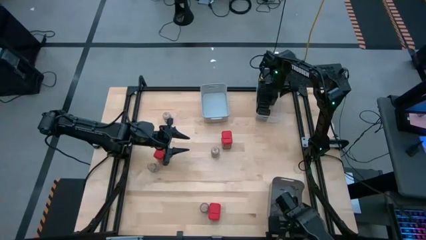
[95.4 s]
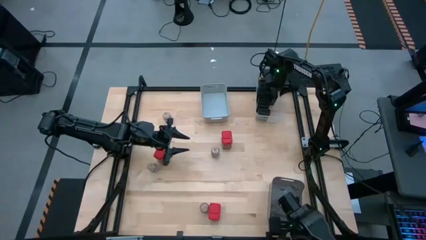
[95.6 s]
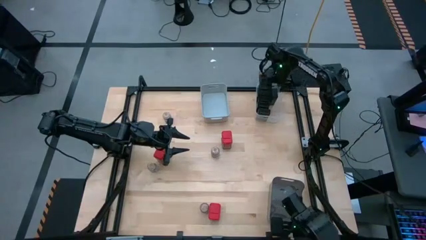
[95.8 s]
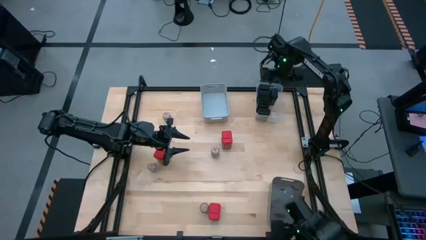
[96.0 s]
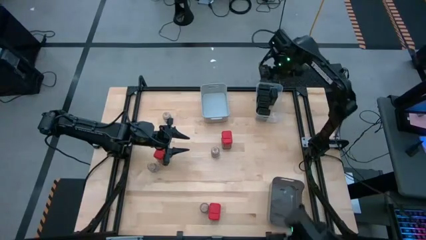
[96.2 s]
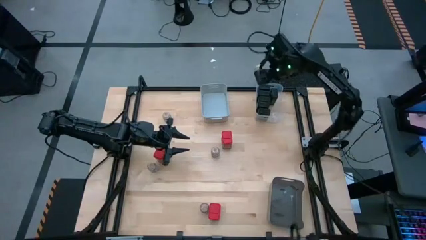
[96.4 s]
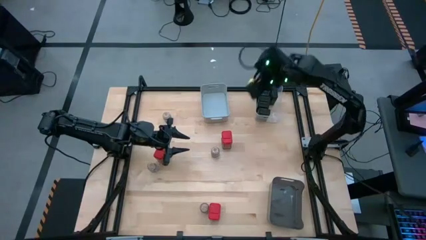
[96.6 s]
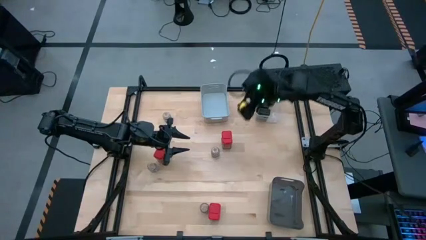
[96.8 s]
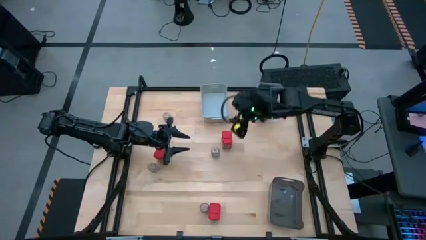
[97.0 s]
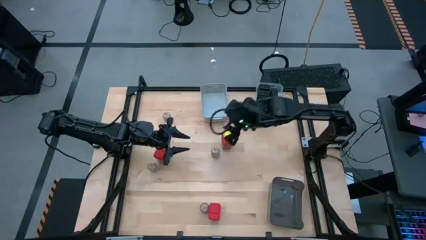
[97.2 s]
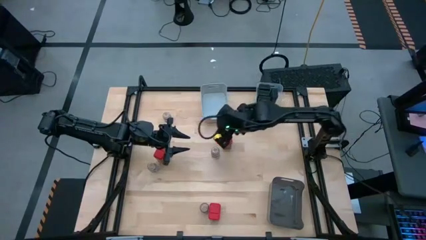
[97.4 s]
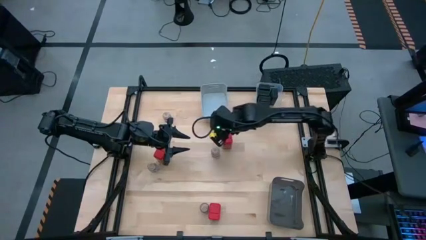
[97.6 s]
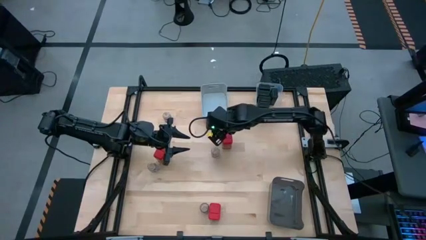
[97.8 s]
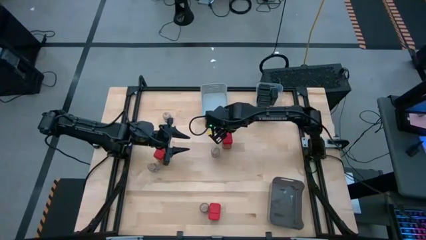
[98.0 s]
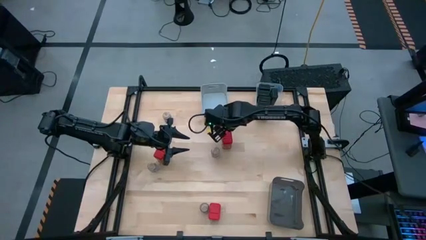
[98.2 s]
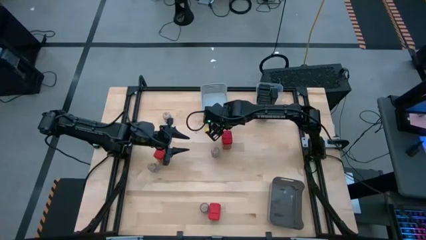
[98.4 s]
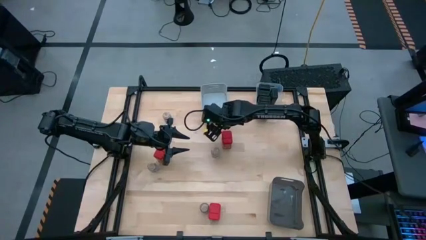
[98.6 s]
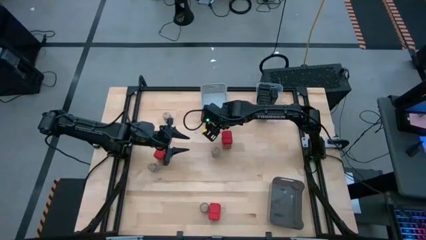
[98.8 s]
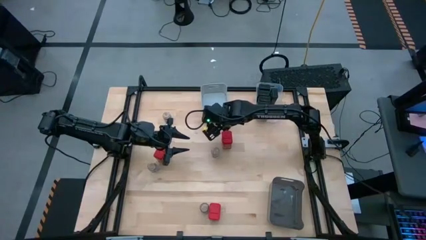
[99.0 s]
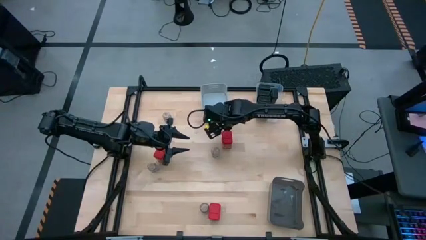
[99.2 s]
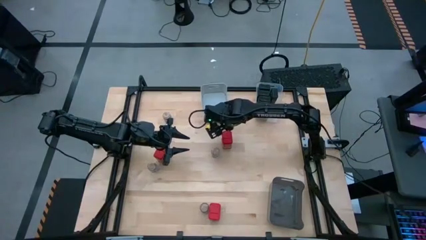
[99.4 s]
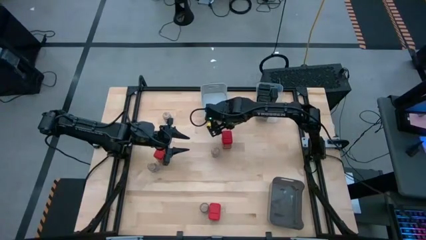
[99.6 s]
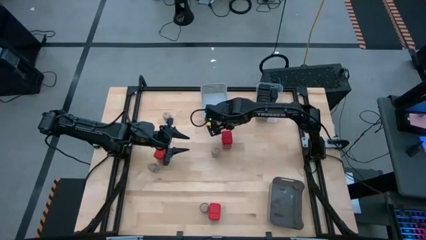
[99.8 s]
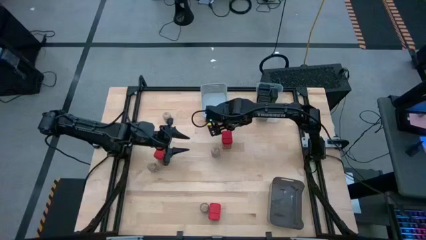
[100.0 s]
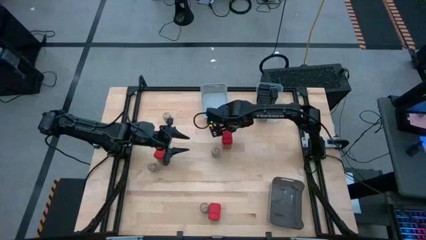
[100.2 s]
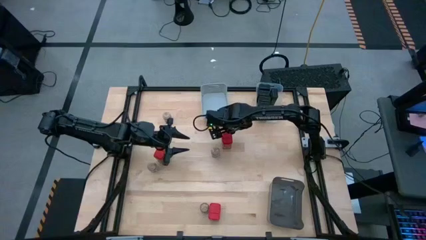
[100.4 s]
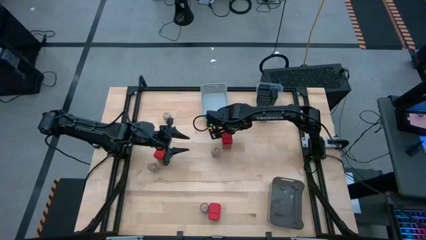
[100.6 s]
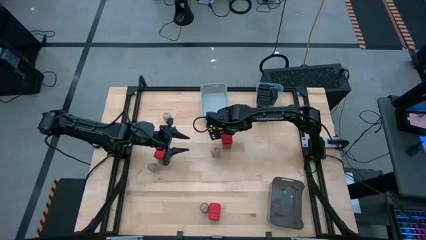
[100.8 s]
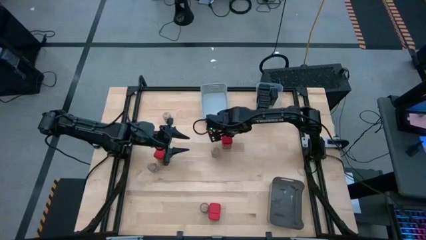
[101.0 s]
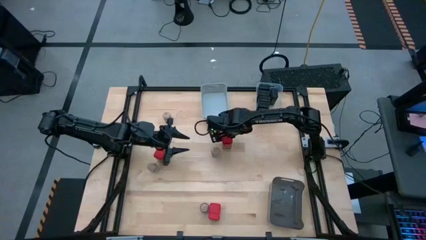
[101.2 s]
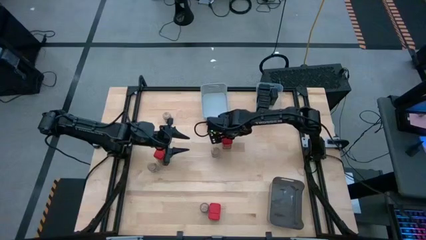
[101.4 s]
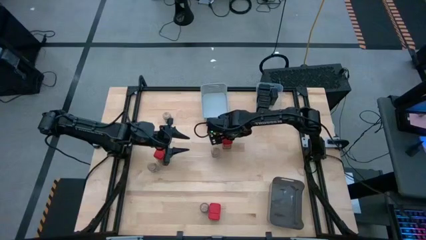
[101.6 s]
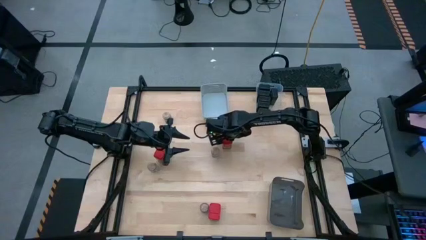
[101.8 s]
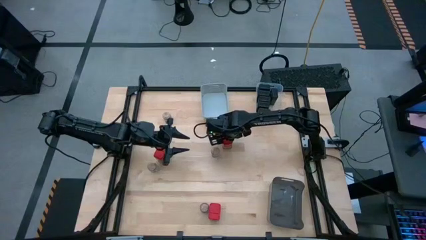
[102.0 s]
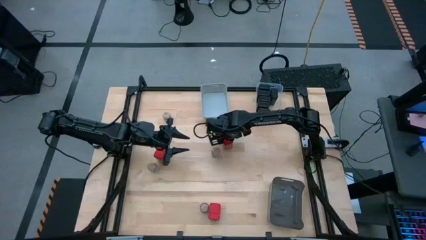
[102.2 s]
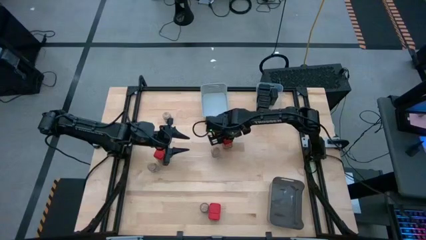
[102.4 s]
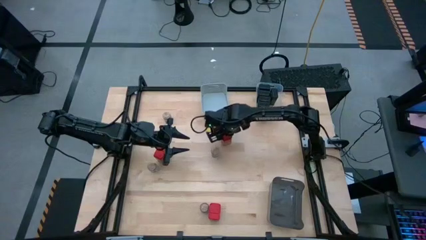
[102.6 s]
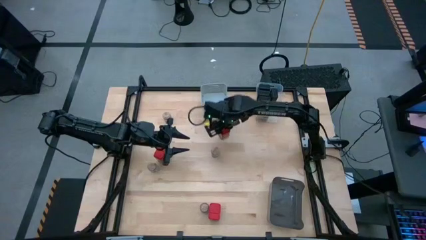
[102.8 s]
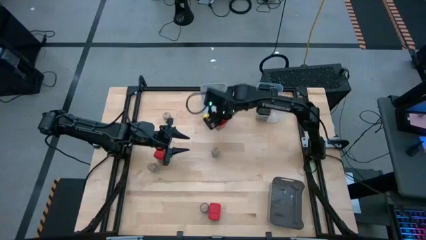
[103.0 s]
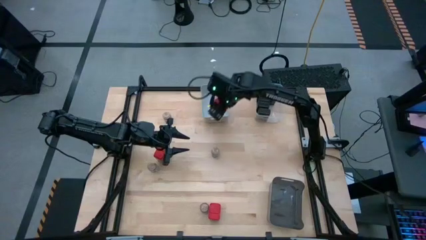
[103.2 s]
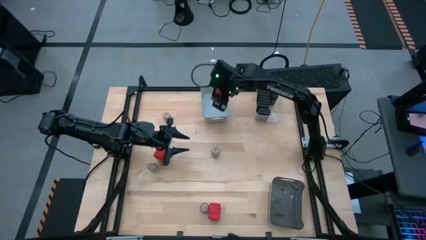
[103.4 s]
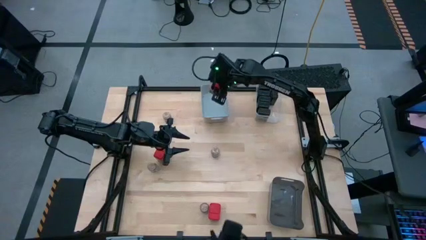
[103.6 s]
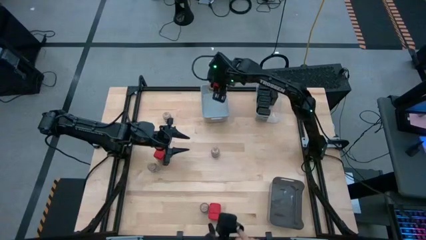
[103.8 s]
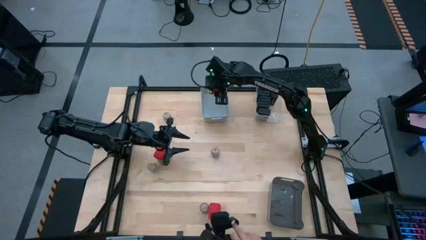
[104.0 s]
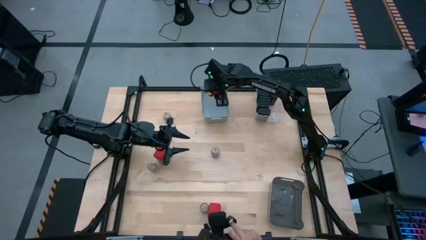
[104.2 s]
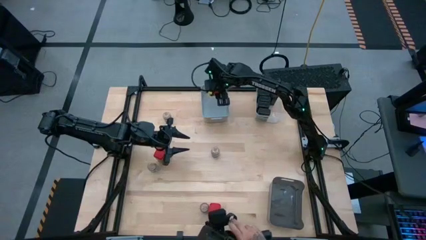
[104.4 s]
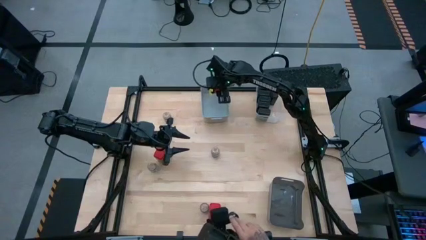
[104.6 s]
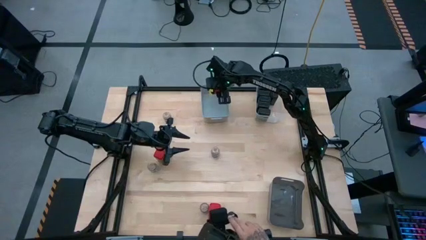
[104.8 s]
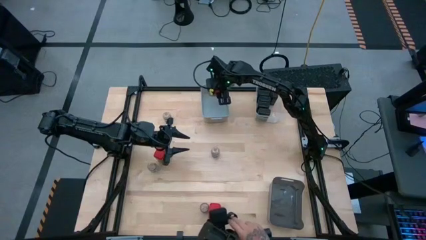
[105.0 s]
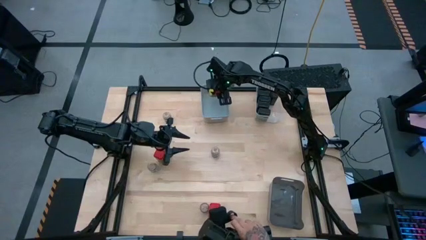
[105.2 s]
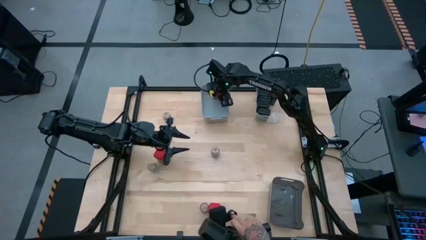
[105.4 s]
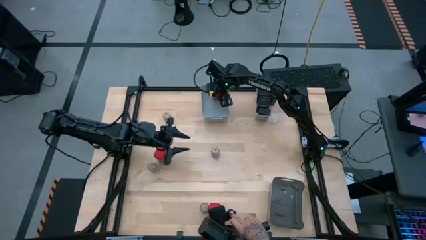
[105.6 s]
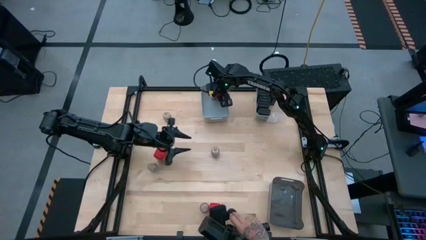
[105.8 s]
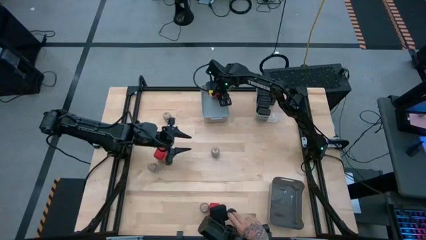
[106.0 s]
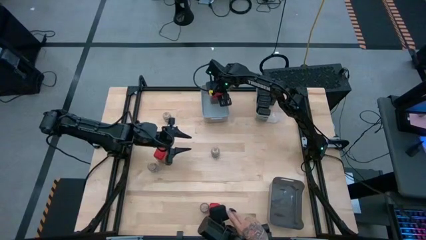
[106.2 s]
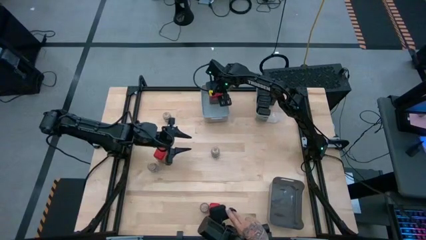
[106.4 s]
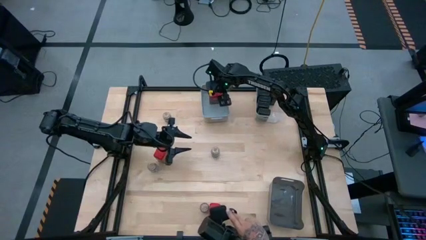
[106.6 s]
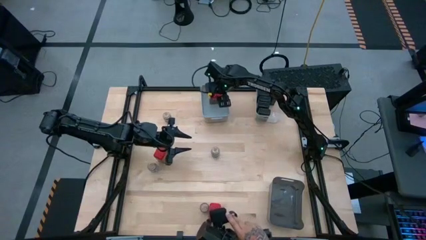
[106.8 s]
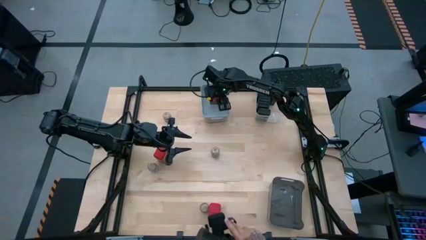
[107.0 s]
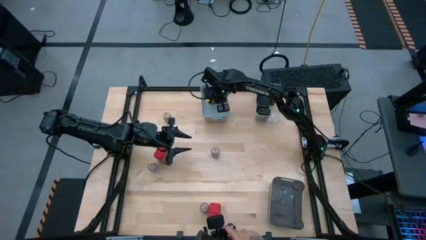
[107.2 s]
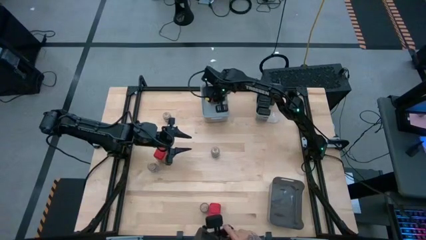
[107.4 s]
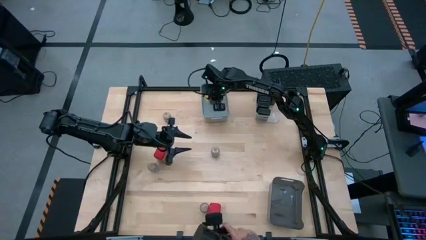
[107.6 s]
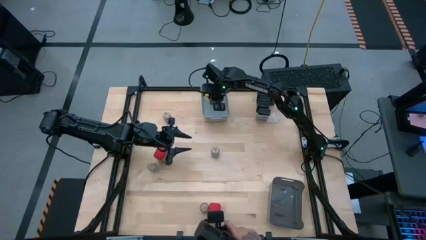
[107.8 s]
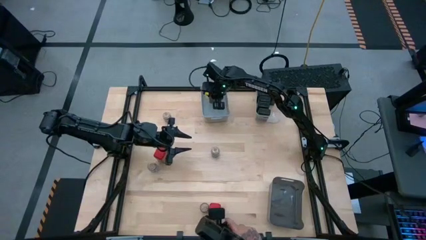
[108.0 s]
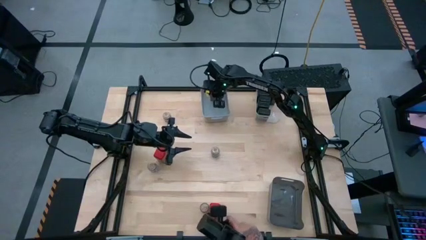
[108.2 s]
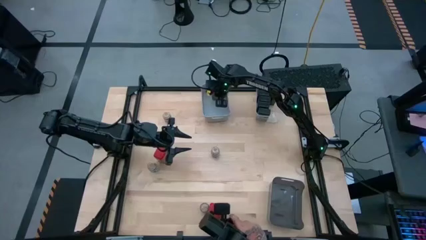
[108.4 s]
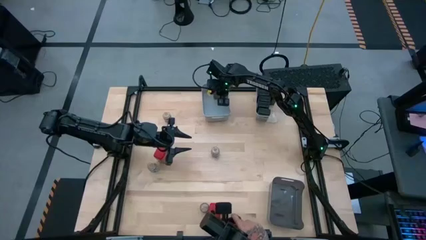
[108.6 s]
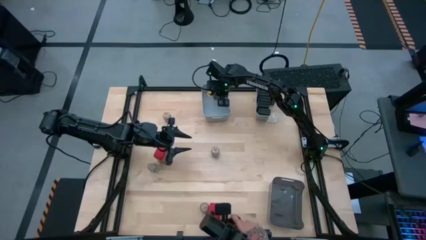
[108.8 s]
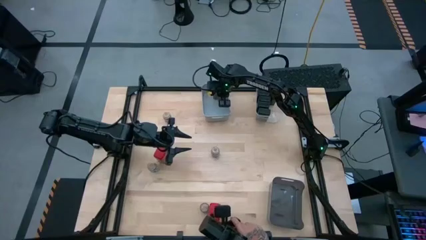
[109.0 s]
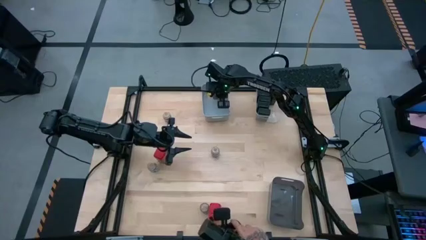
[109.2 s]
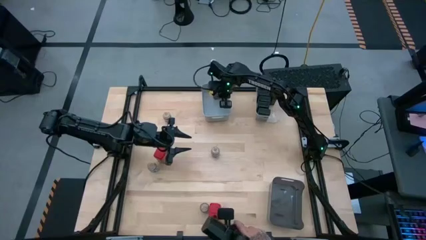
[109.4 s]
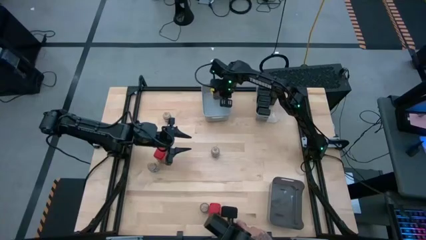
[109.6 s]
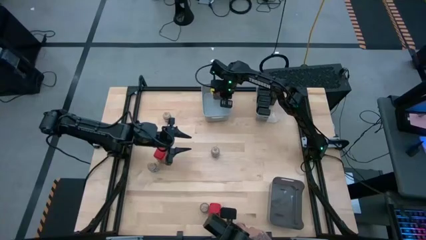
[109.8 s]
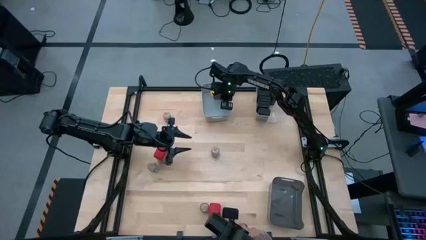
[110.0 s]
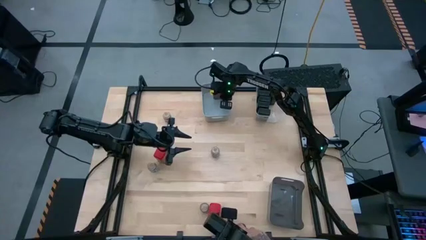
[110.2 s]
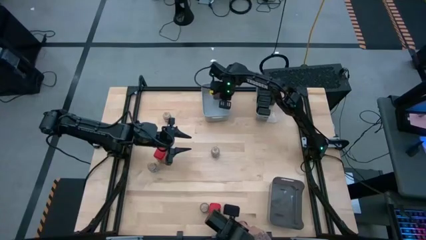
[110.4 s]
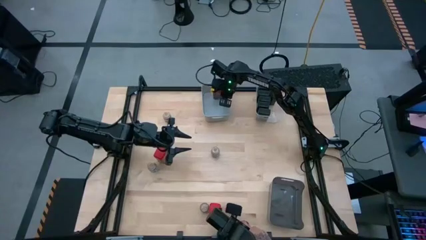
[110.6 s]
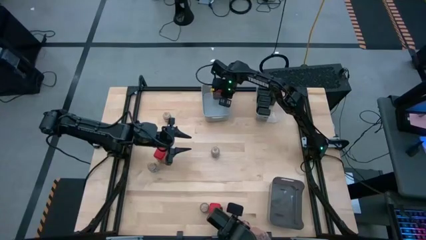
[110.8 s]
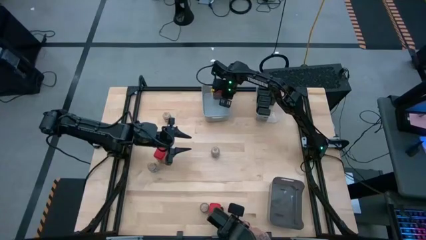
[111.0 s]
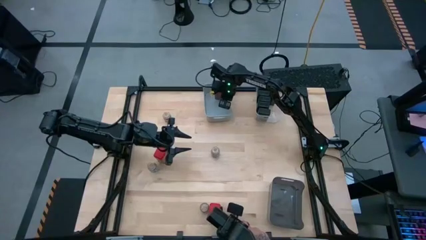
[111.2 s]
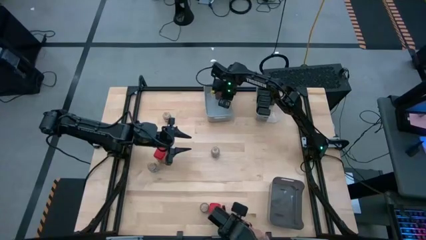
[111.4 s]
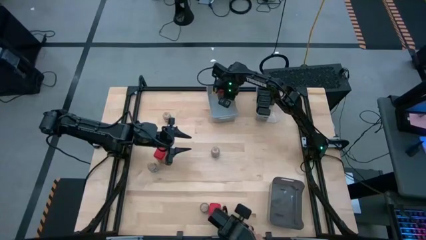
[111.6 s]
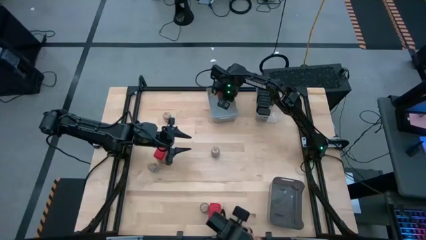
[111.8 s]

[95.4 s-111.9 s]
Task: Sort spices by type
Put the red seasoning can into the gray bin

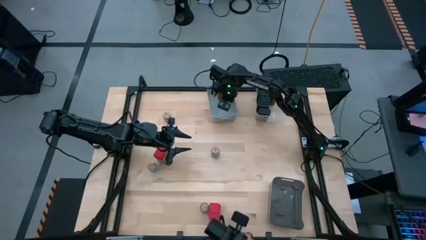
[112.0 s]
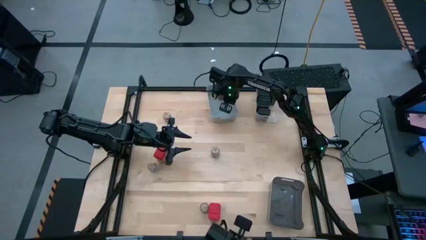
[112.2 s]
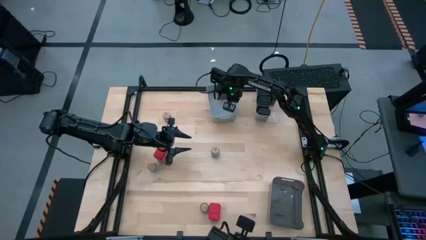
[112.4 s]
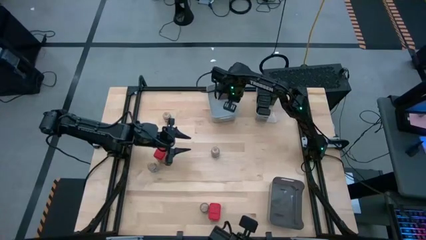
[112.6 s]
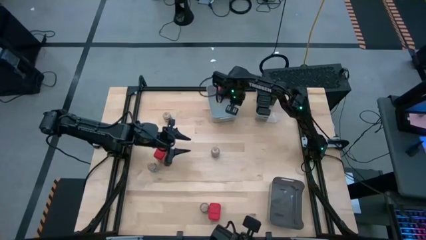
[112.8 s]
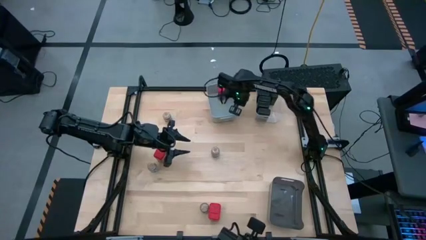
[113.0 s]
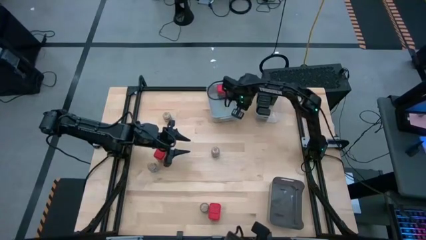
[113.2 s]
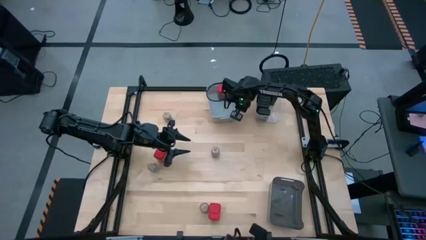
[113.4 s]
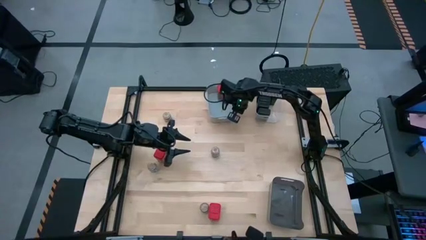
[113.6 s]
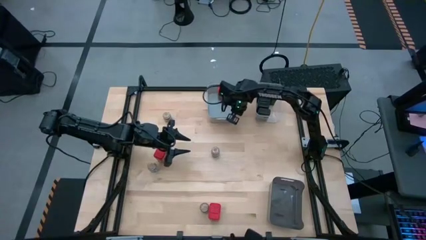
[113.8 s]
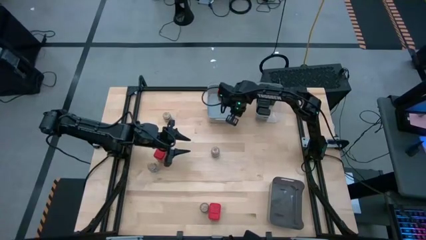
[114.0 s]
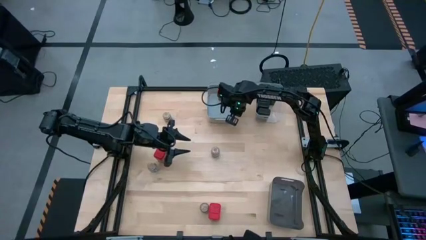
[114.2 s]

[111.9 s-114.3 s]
Adjust the gray bin on the table
